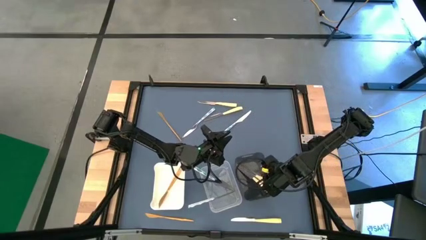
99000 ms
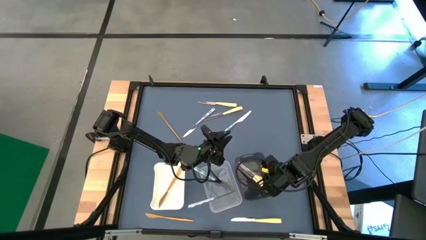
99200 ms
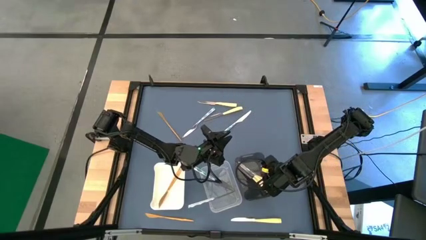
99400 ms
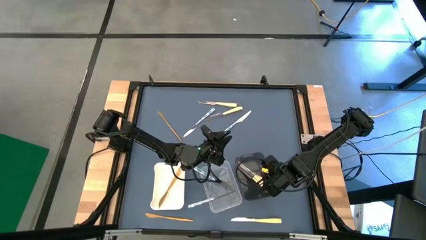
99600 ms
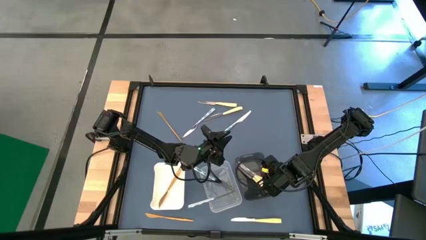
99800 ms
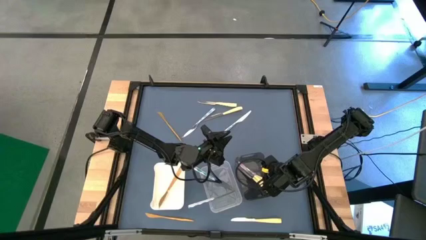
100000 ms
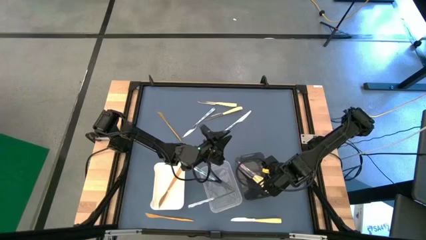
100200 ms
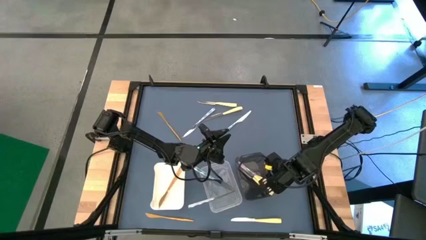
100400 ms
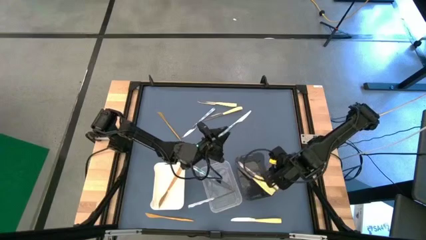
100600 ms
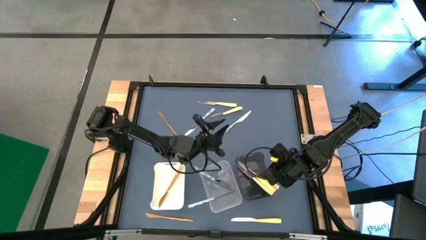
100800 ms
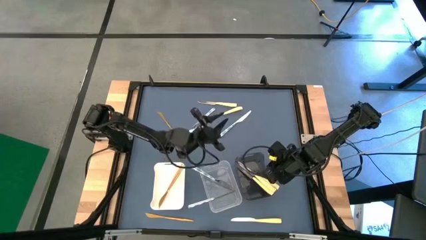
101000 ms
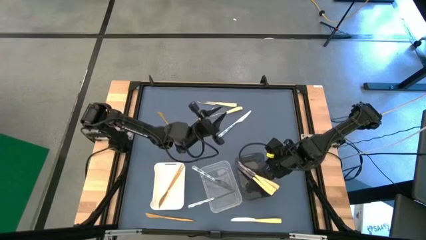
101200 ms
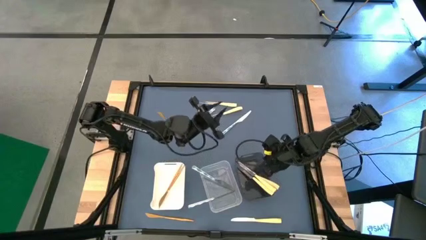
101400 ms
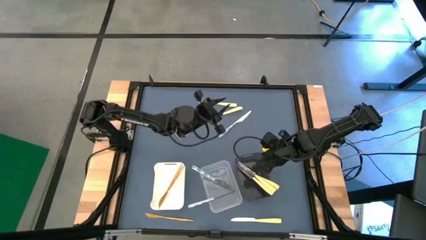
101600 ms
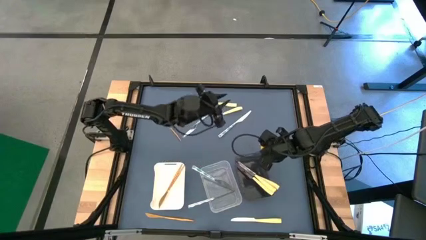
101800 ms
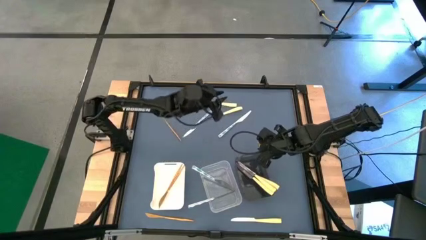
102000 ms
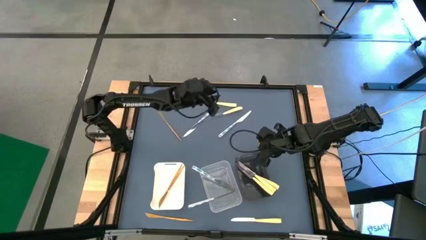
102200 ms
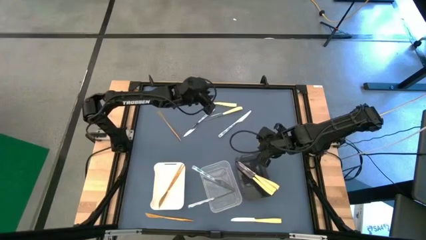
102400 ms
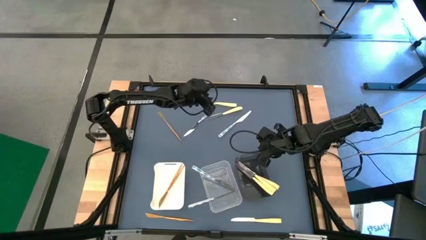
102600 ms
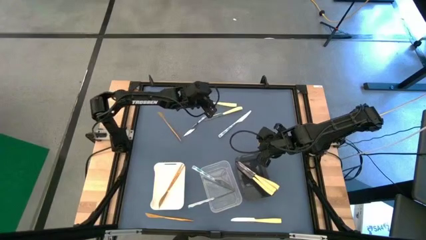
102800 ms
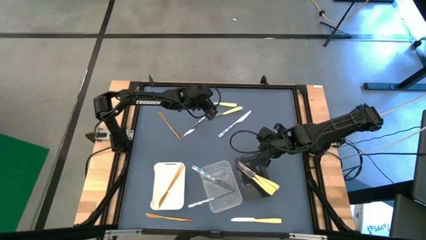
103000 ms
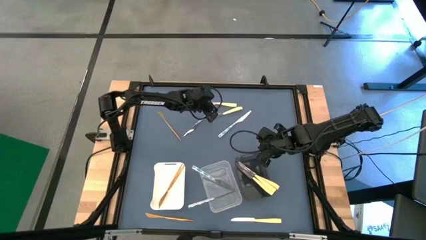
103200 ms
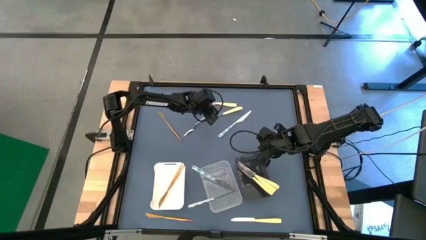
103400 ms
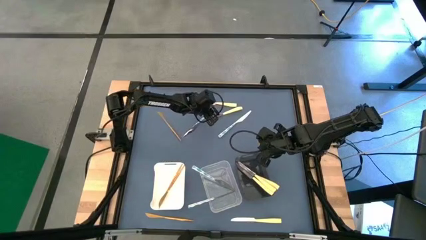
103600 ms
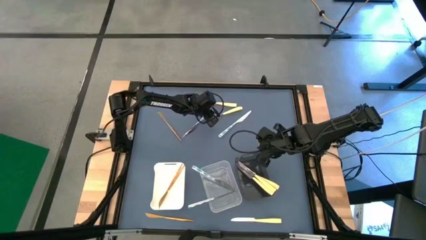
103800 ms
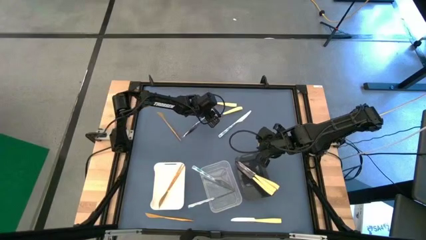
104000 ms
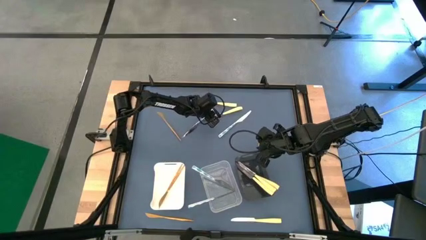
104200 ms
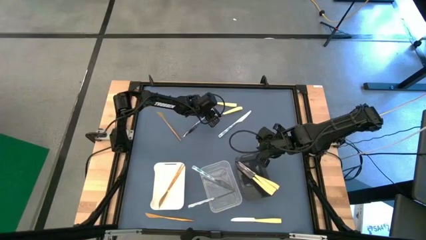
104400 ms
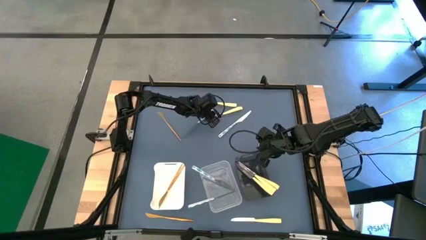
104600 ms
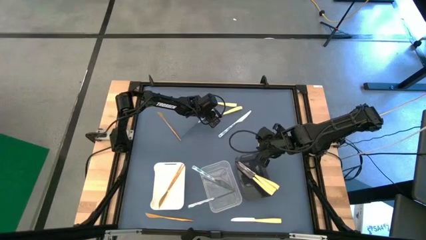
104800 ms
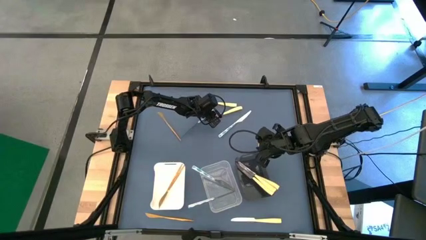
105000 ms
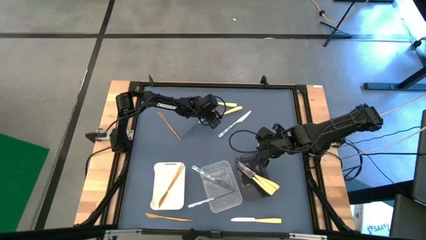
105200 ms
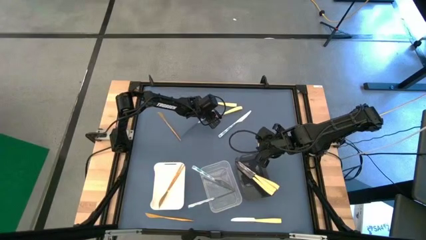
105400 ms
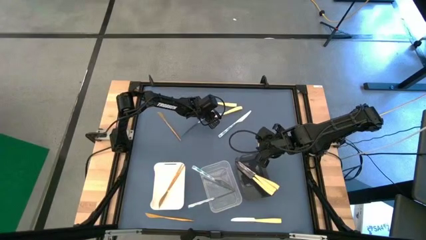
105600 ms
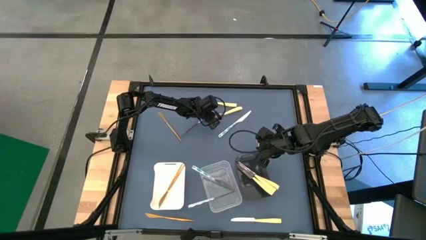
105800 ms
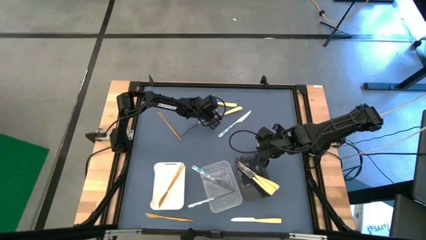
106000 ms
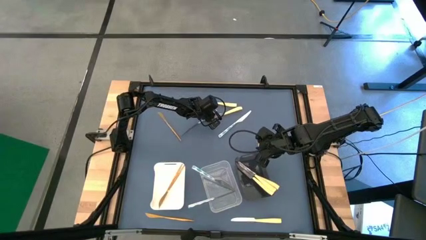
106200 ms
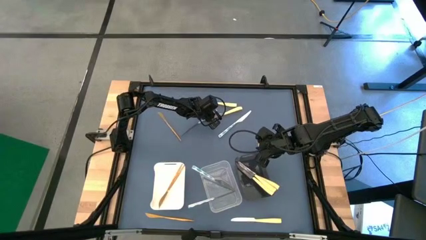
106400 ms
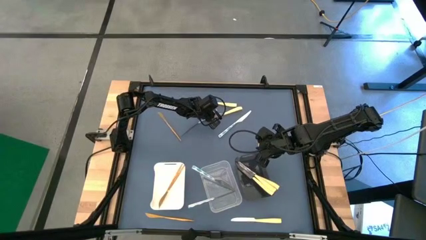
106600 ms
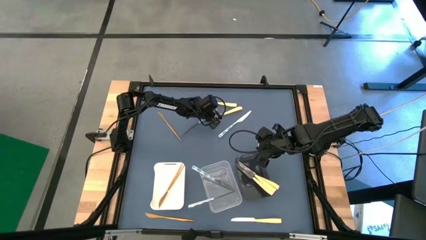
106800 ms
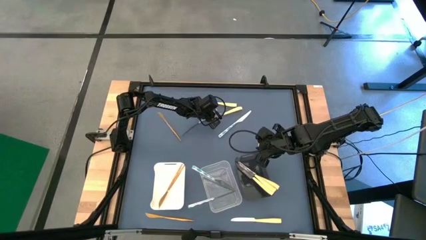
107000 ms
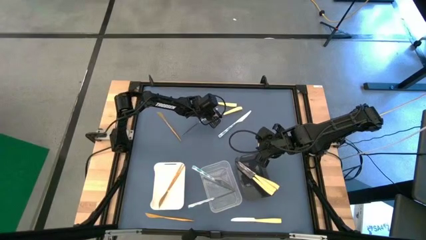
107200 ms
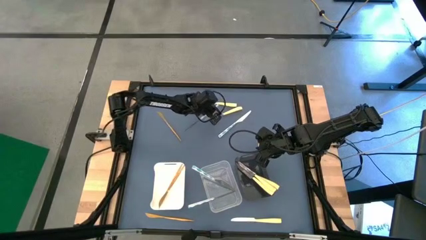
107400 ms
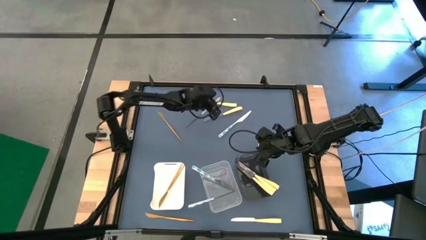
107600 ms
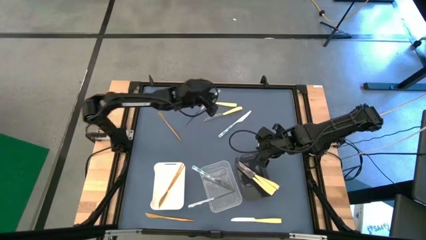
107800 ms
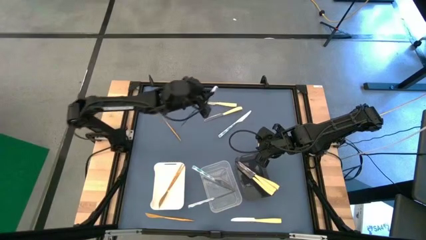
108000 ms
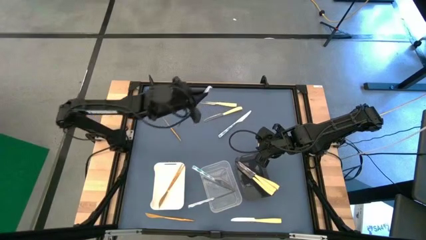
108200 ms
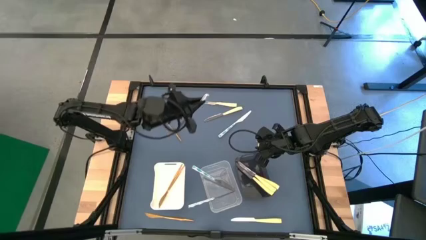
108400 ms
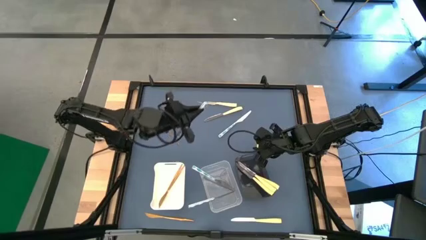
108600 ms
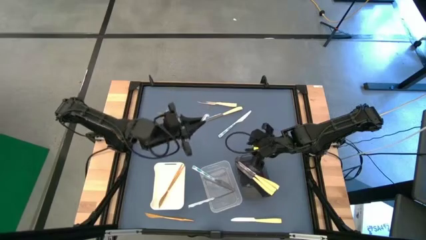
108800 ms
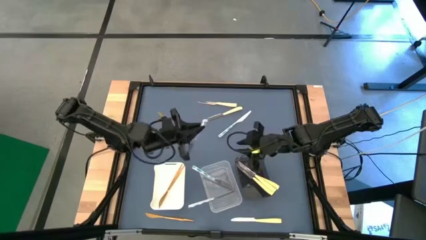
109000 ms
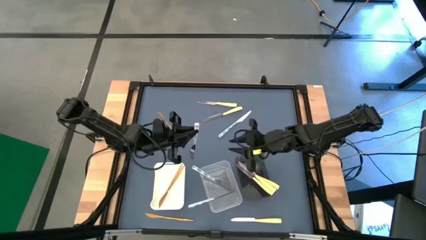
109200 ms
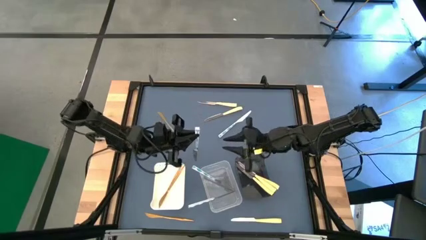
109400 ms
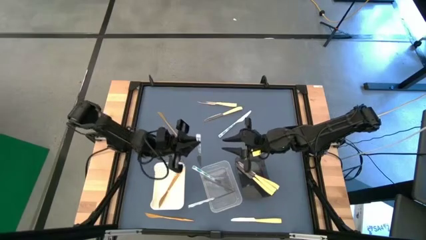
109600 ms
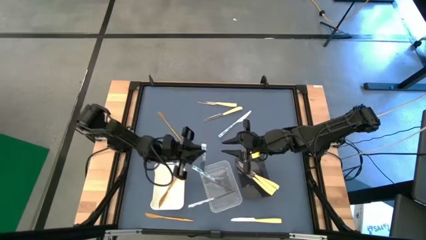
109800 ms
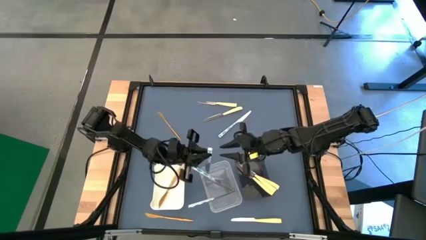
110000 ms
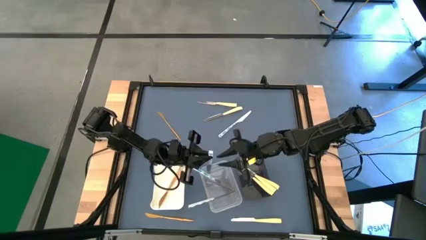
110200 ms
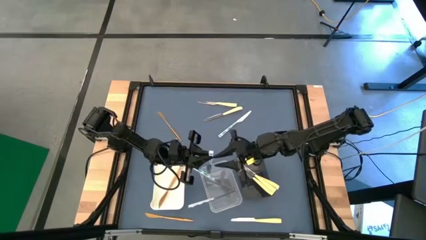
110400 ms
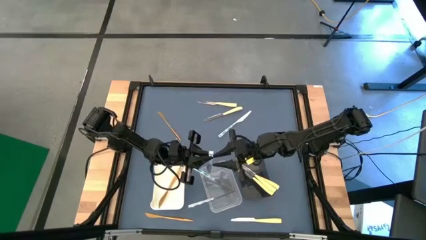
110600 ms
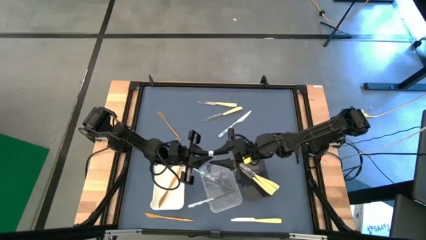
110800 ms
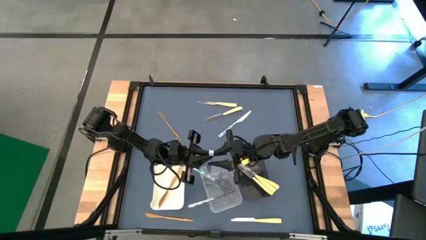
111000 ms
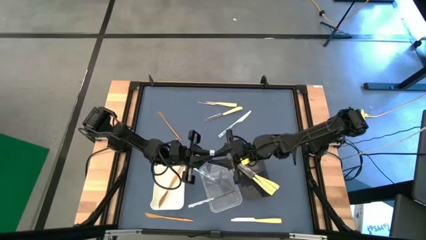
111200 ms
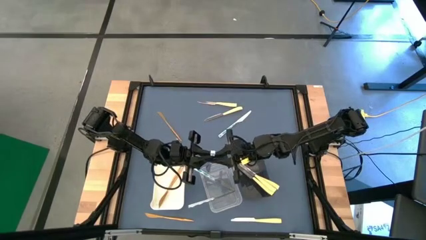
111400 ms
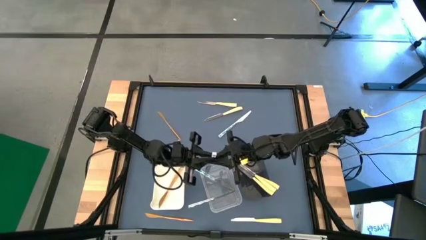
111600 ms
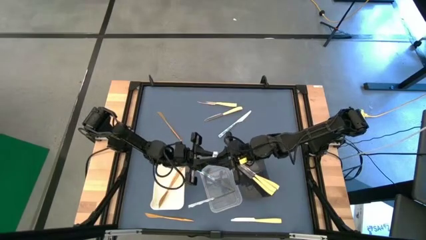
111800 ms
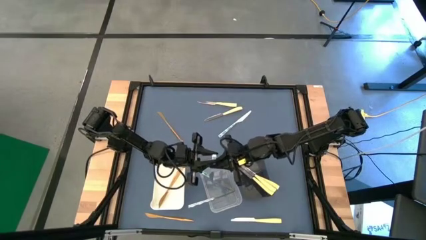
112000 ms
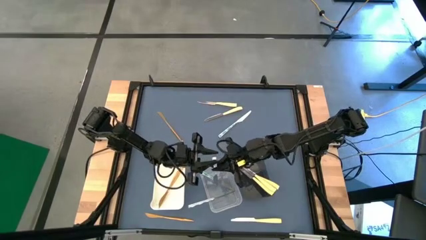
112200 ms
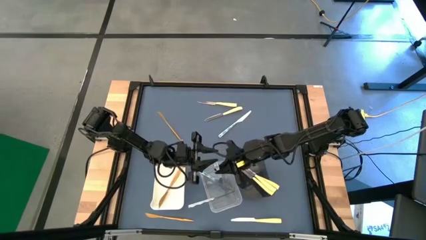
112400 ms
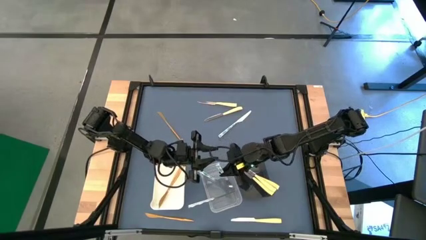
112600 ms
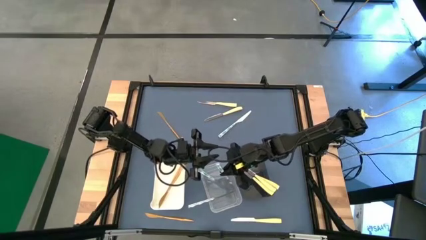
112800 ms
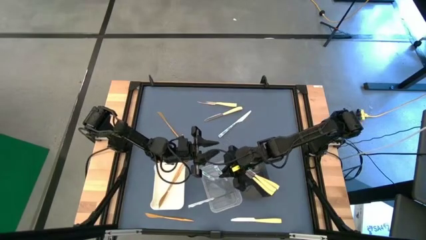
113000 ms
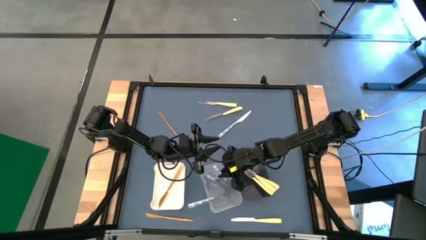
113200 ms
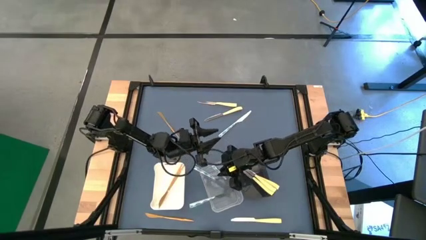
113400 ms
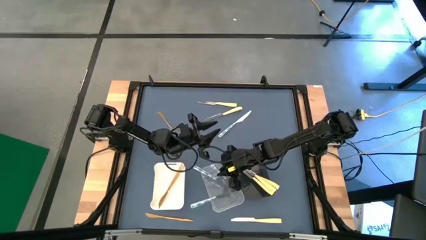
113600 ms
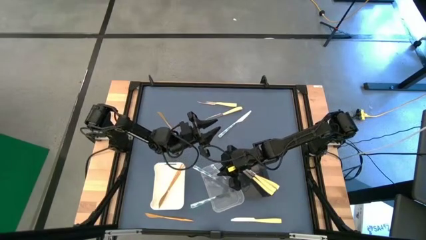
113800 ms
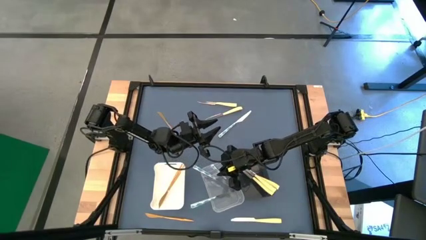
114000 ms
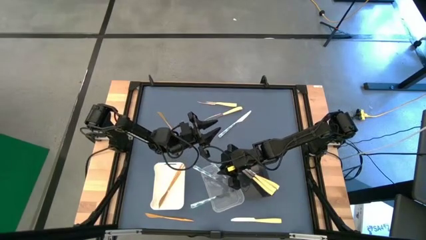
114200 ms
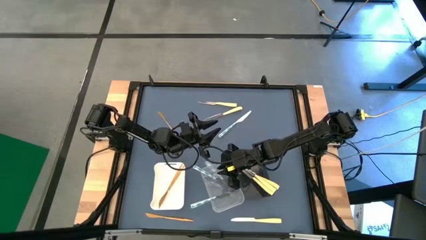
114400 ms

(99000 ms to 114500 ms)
Task: Sort silverware by color (type)
Put the blue patterned table knife into the transparent bin
